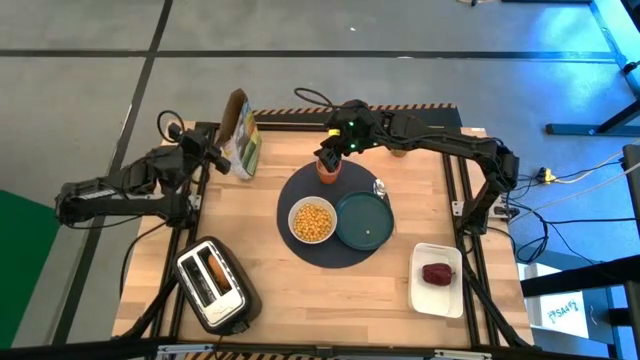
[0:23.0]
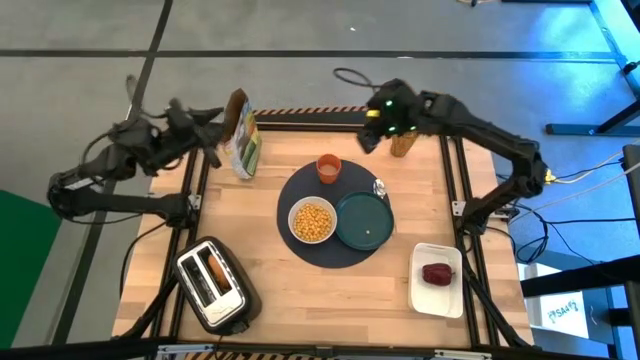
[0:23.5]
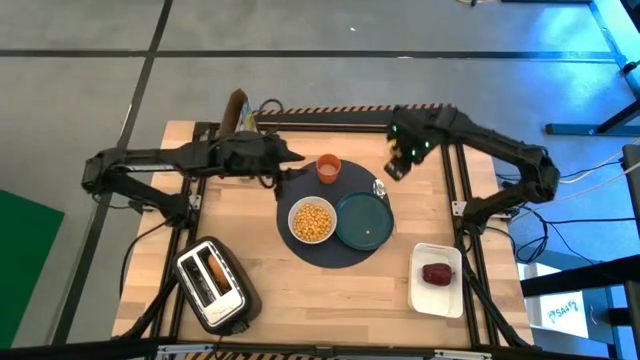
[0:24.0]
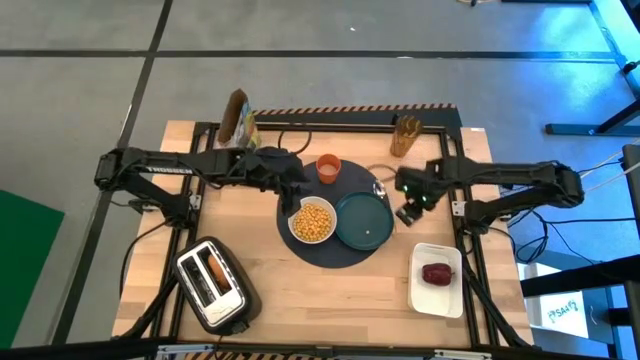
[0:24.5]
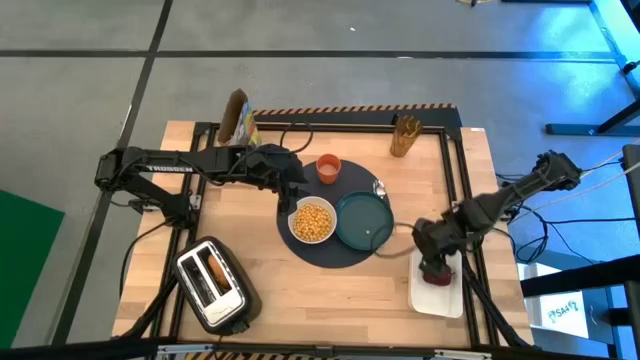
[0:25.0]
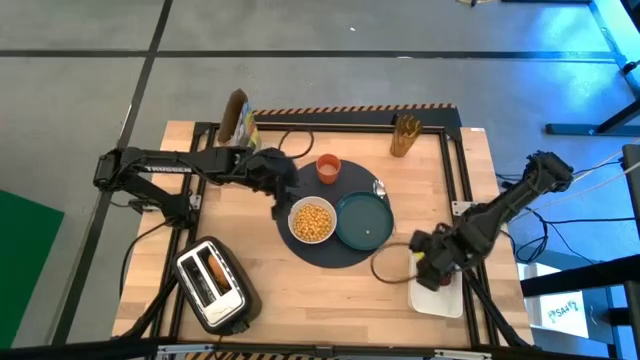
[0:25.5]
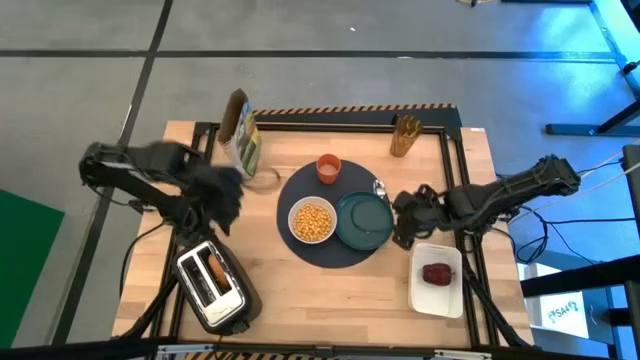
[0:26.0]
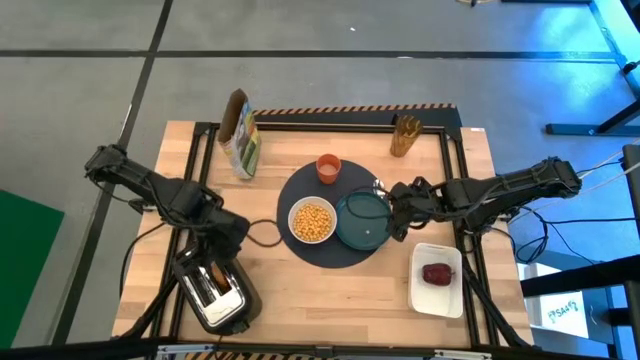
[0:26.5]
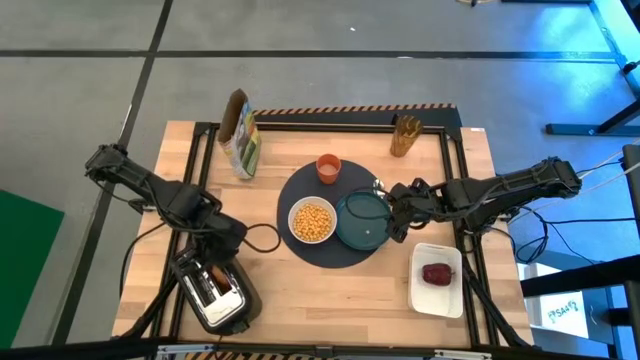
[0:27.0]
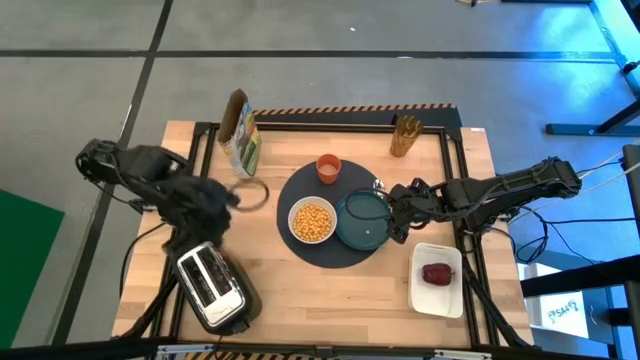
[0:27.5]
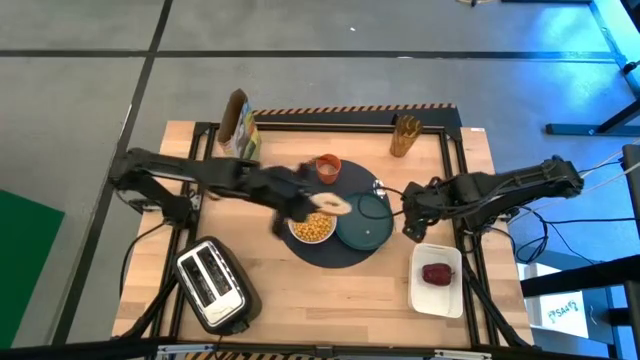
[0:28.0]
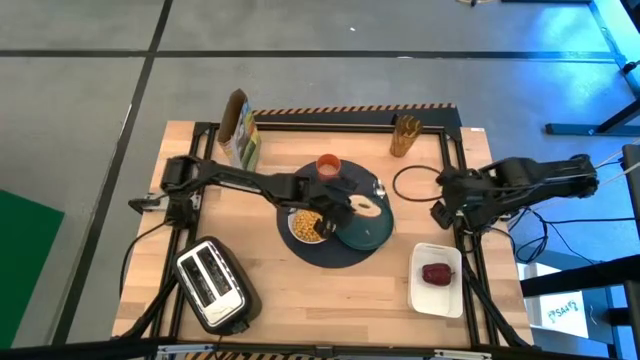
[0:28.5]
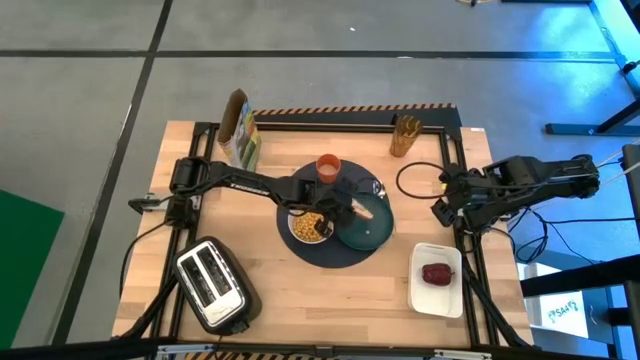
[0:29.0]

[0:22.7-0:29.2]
Task: Arrange a breakfast setting
Put the toasted bagel from the toaster on the plate

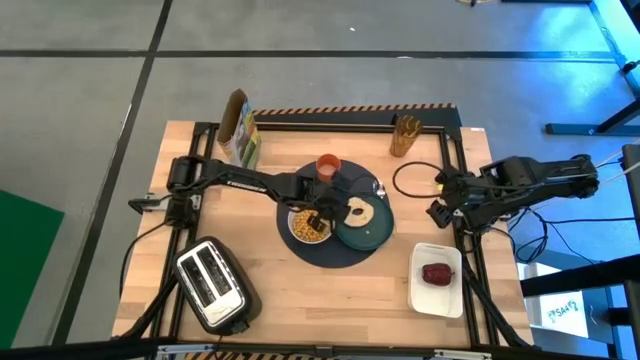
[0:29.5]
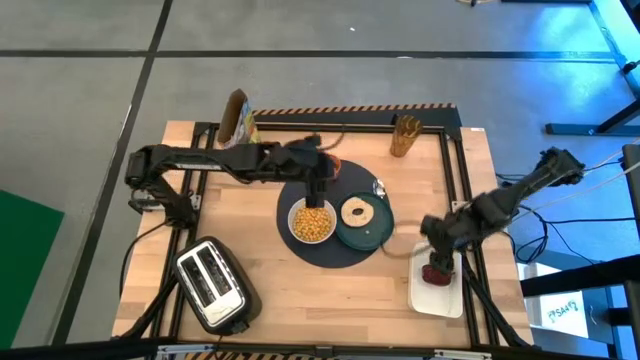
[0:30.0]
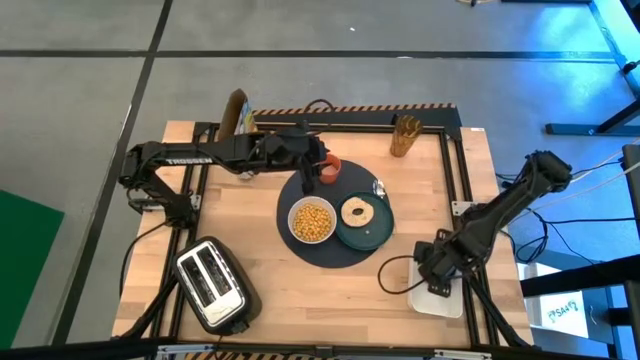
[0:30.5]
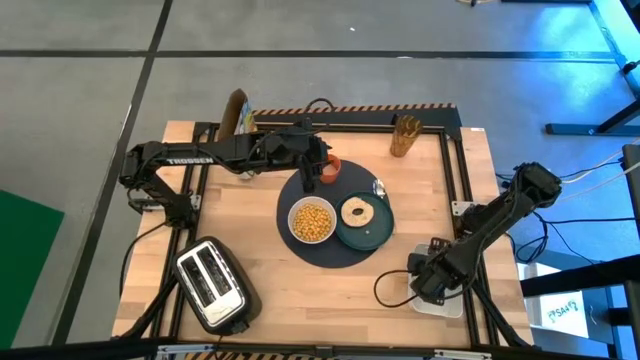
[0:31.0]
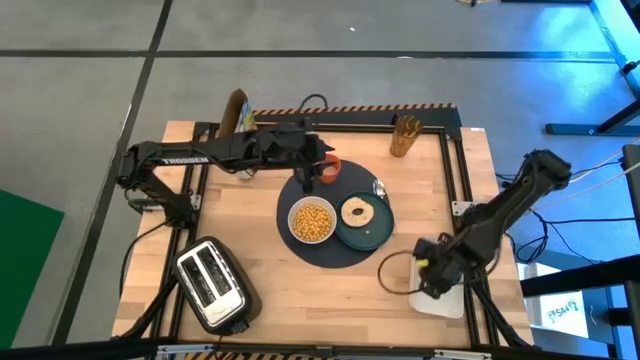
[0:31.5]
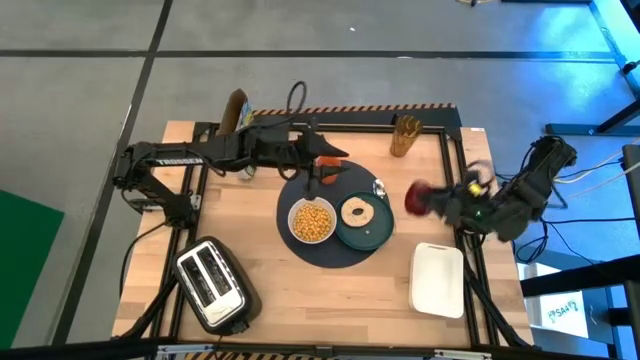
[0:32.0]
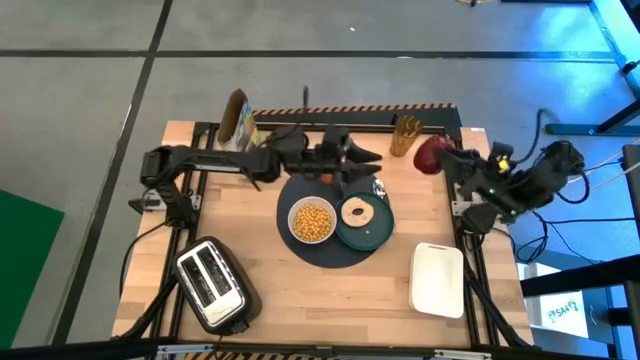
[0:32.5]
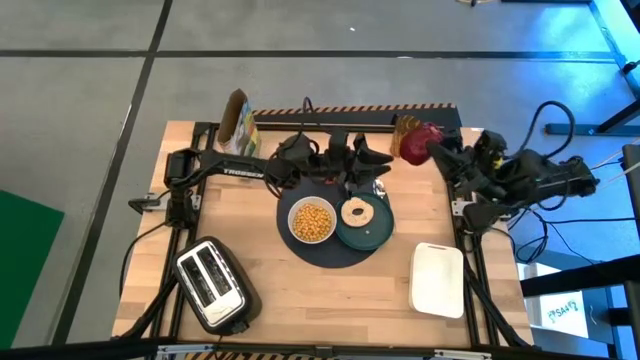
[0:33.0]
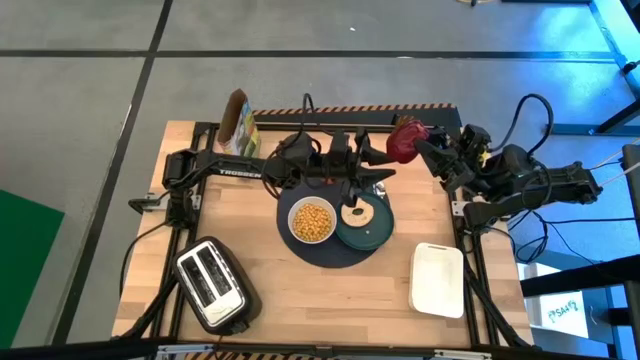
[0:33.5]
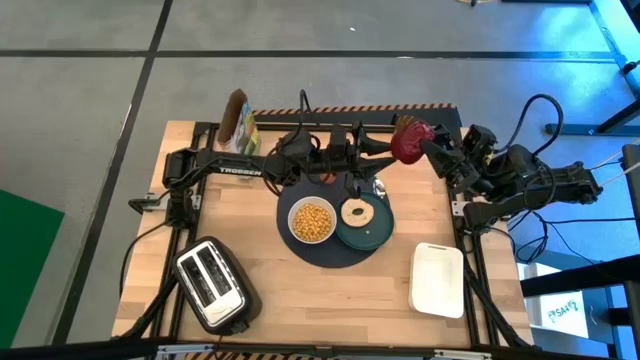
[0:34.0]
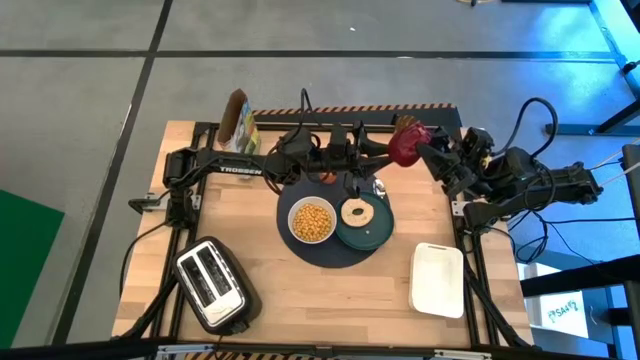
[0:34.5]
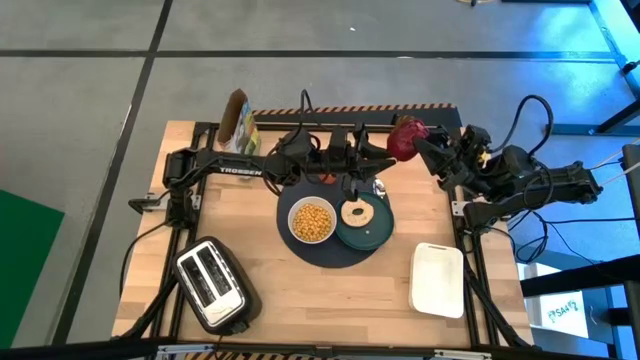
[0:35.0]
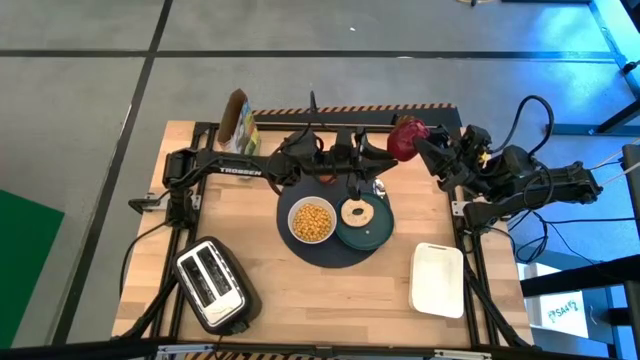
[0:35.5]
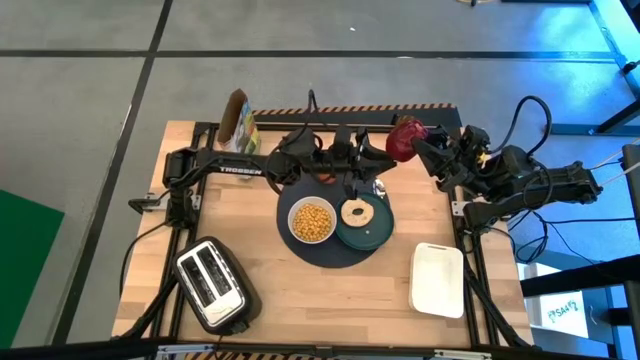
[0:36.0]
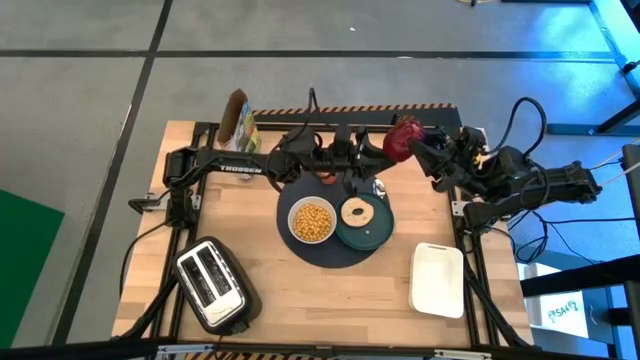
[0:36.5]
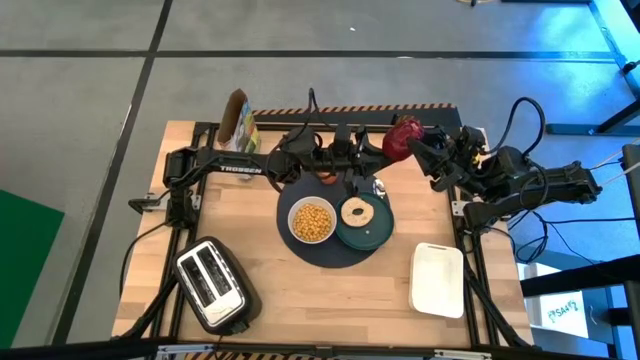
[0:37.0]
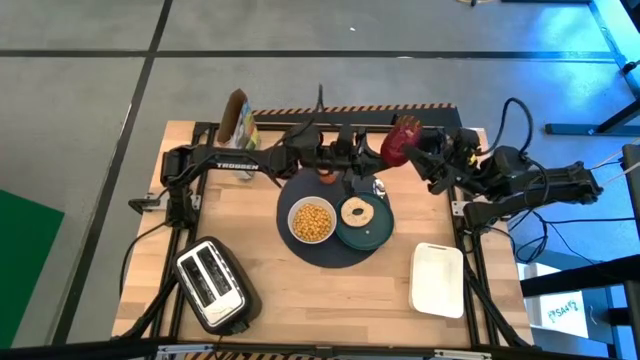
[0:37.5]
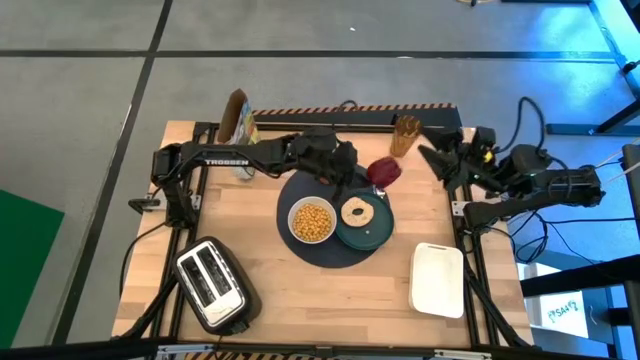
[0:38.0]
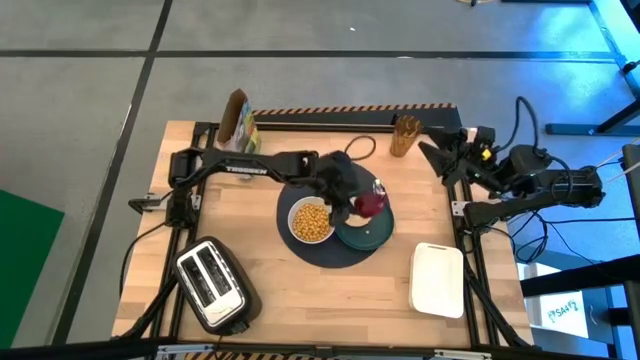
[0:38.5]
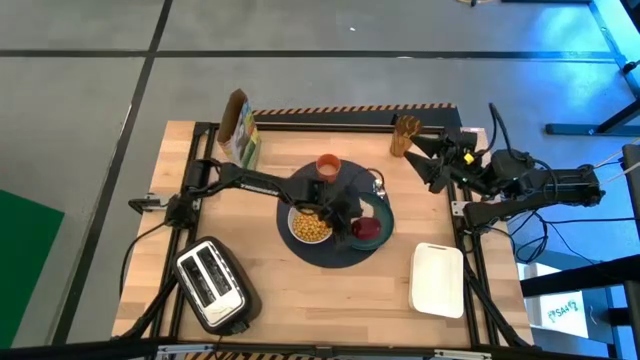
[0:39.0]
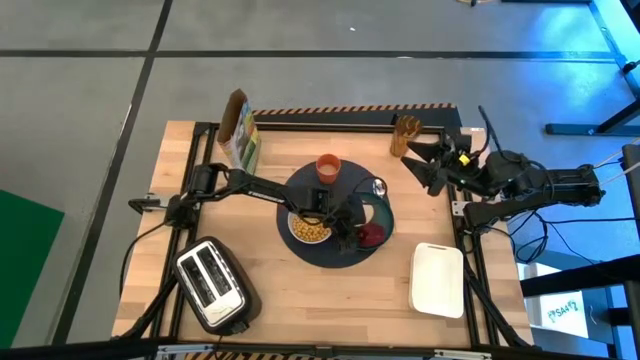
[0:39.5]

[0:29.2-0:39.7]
Put the apple on the plate

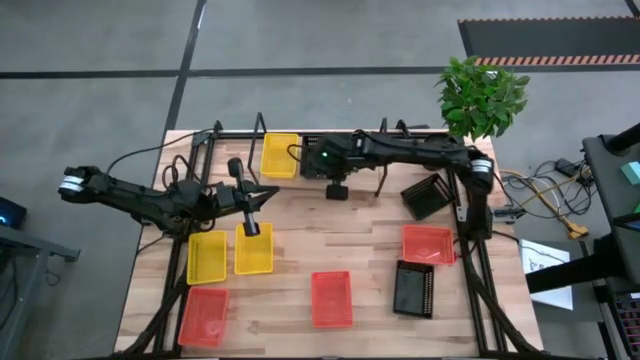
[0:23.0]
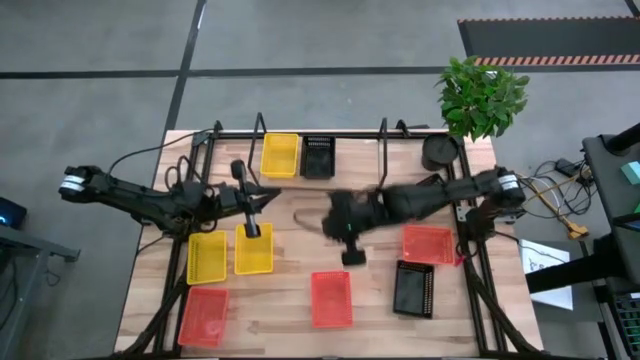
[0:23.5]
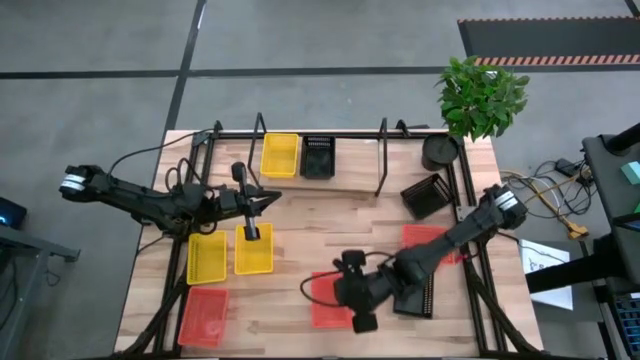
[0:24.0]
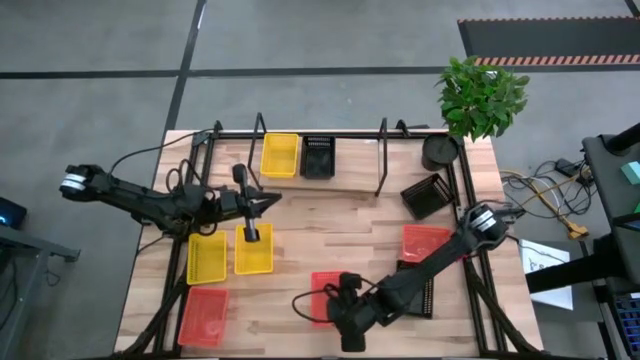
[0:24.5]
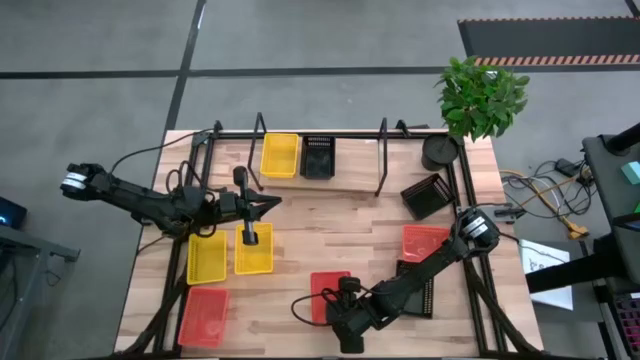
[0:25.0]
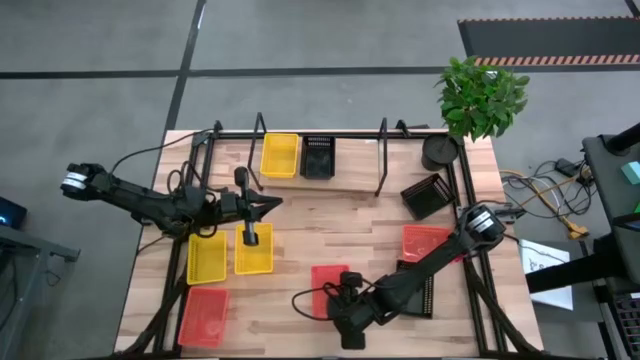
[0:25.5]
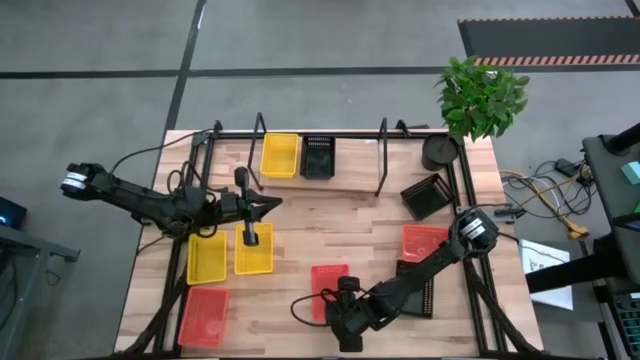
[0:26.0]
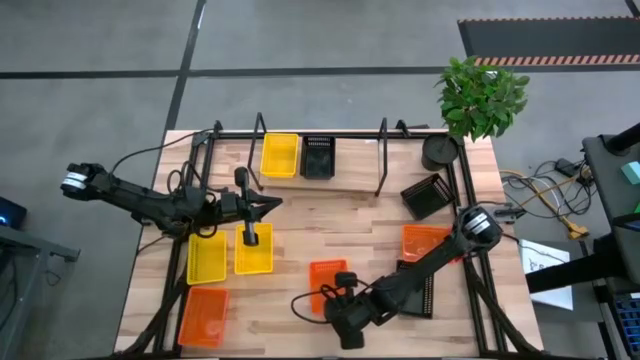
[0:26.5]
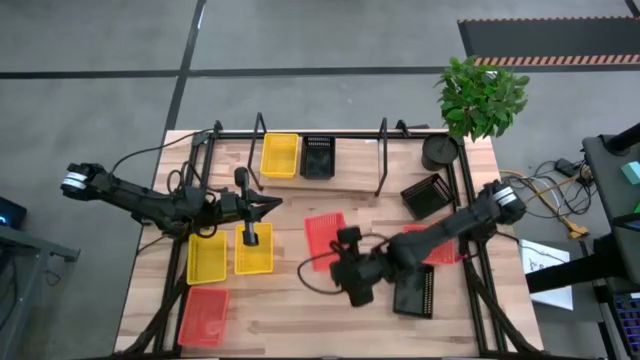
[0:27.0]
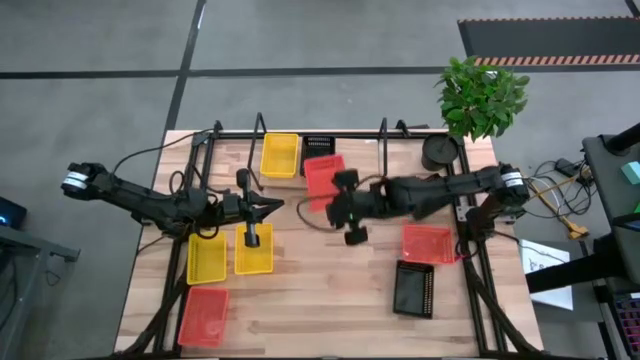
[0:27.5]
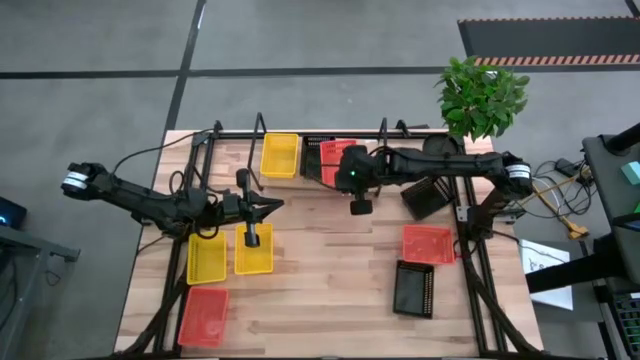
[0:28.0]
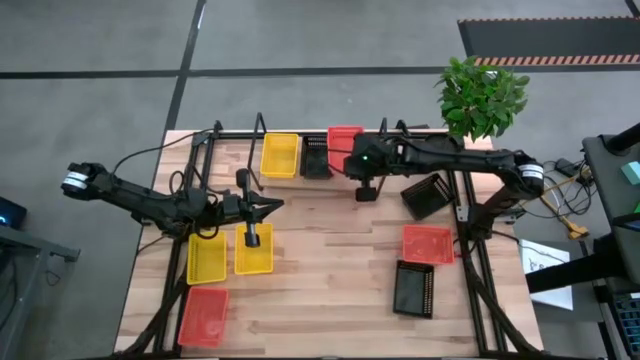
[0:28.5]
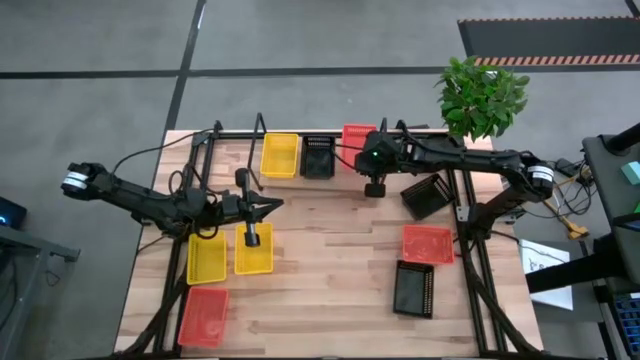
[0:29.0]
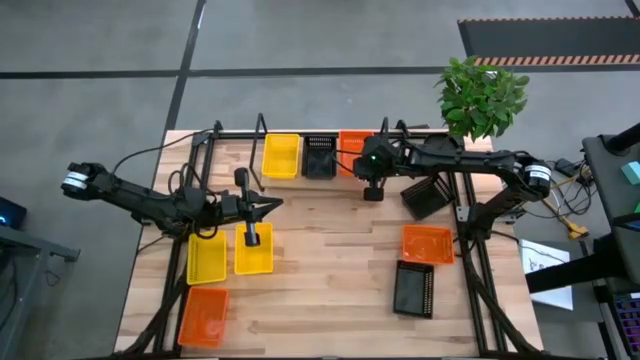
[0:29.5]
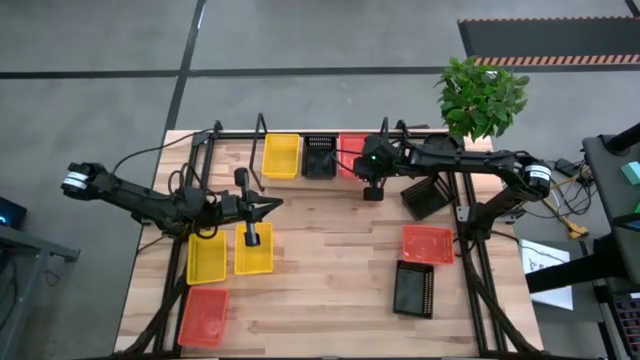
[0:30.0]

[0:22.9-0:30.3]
Task: Stack baskets on shelf by color
Put the middle orange bin on the shelf
